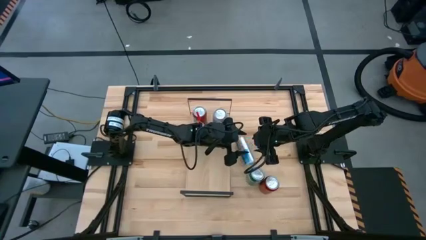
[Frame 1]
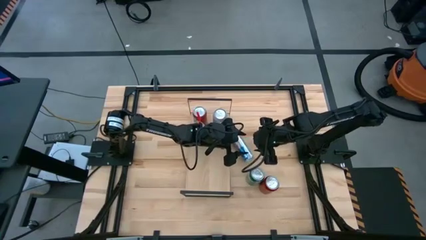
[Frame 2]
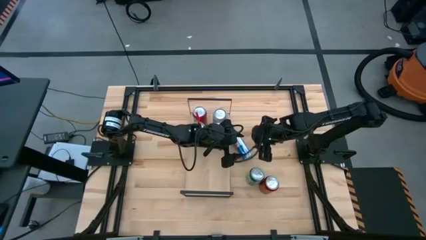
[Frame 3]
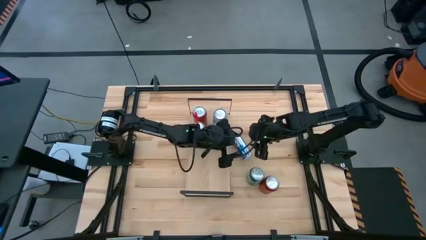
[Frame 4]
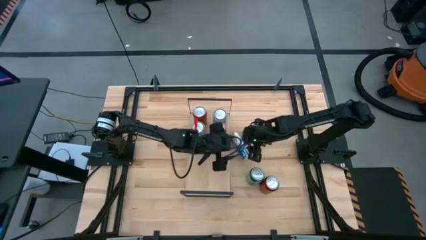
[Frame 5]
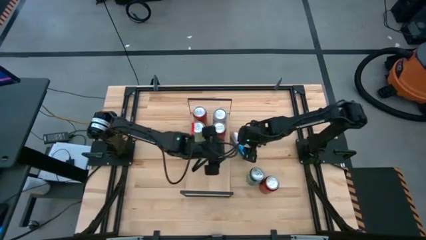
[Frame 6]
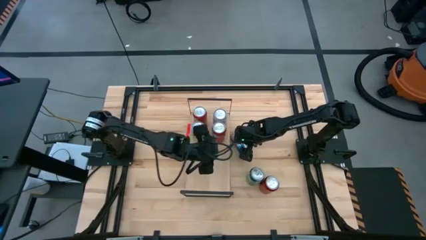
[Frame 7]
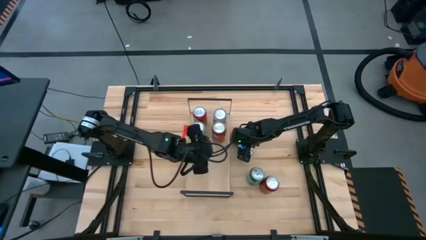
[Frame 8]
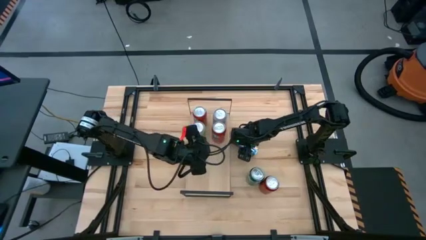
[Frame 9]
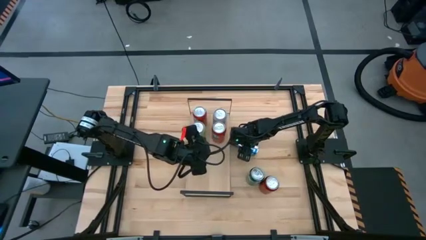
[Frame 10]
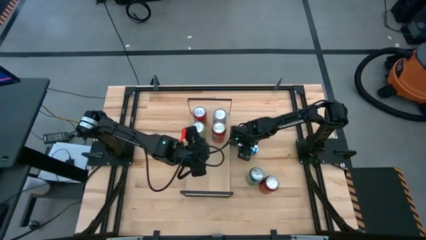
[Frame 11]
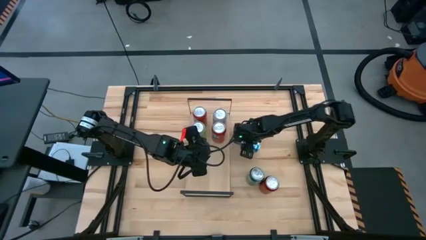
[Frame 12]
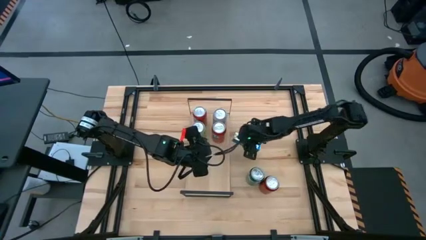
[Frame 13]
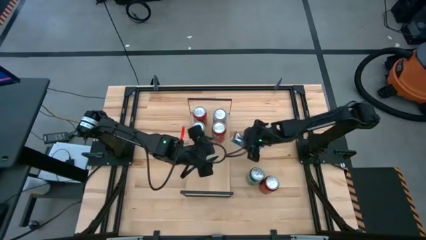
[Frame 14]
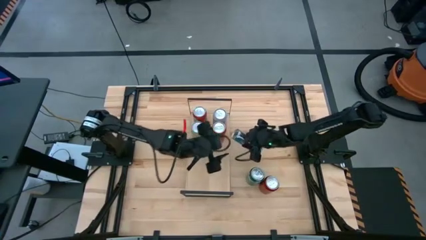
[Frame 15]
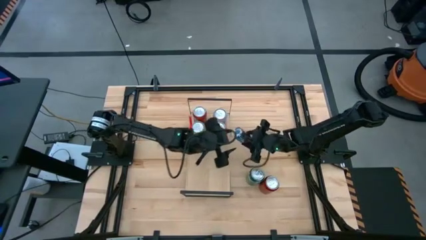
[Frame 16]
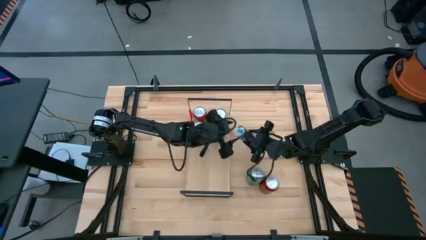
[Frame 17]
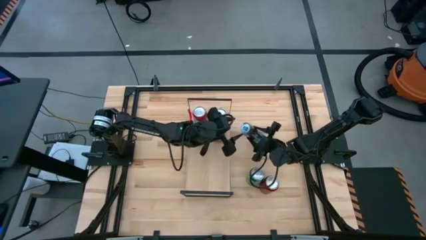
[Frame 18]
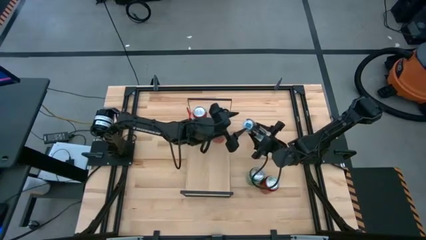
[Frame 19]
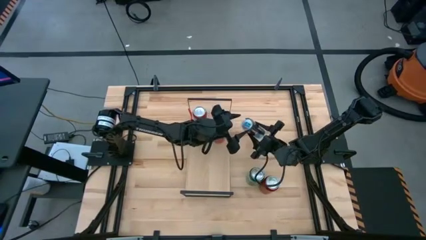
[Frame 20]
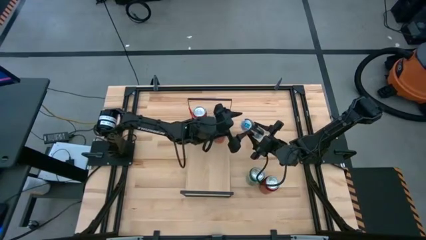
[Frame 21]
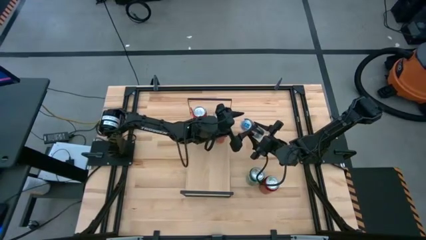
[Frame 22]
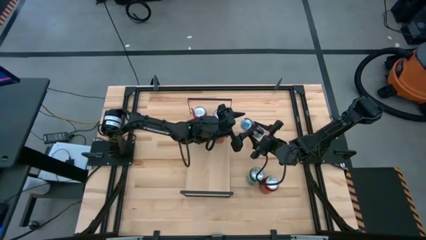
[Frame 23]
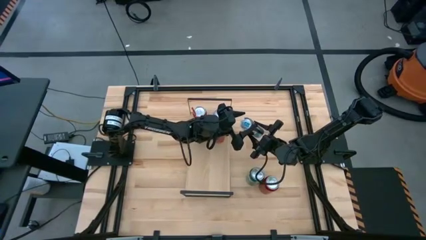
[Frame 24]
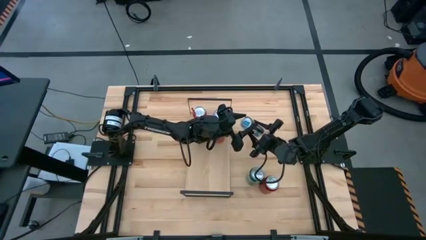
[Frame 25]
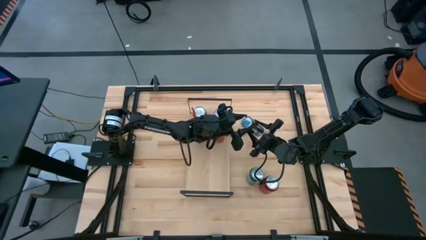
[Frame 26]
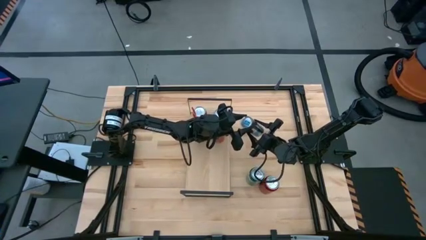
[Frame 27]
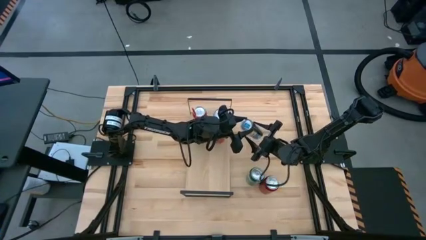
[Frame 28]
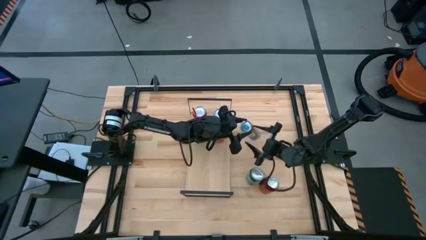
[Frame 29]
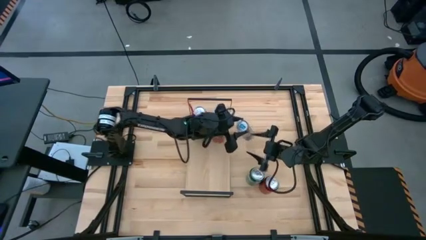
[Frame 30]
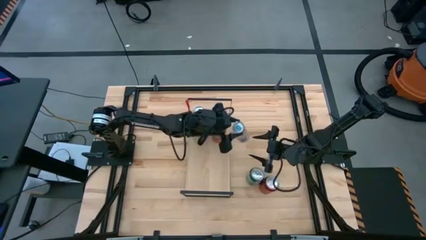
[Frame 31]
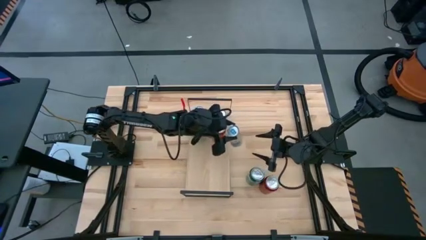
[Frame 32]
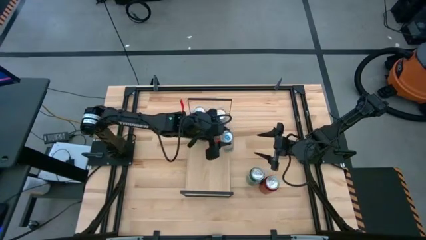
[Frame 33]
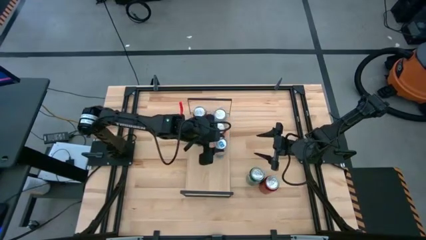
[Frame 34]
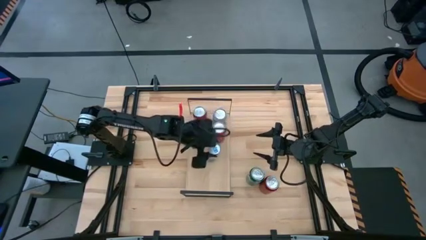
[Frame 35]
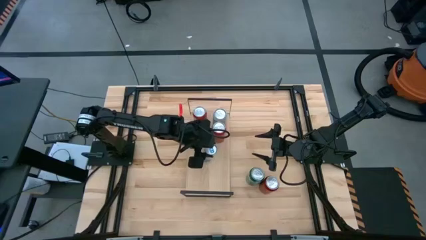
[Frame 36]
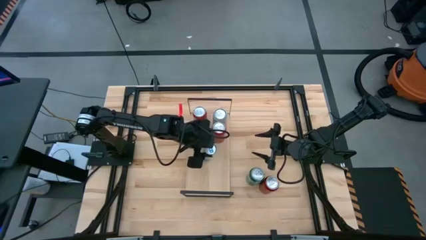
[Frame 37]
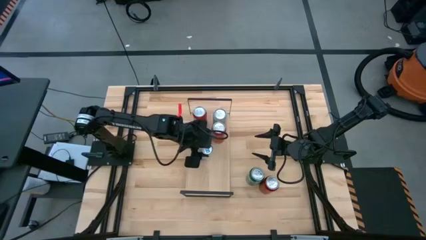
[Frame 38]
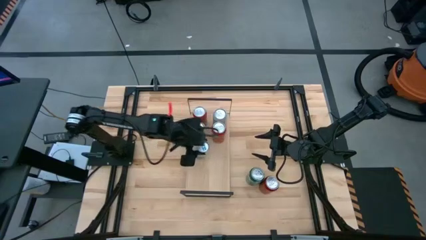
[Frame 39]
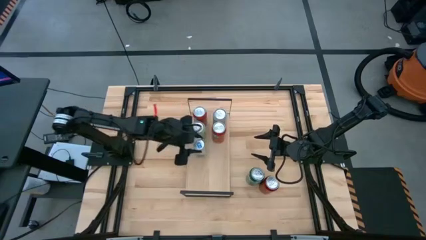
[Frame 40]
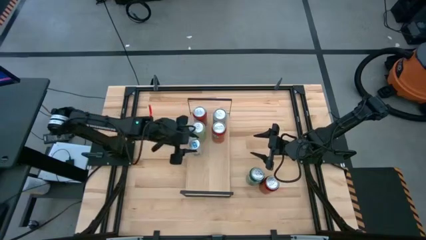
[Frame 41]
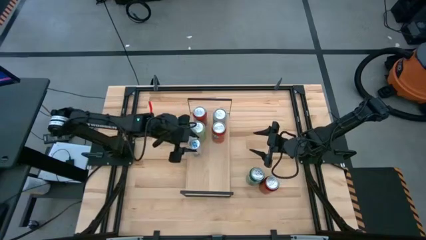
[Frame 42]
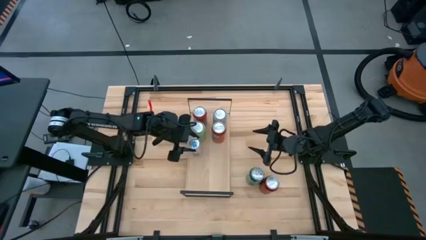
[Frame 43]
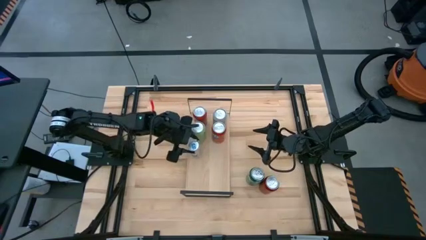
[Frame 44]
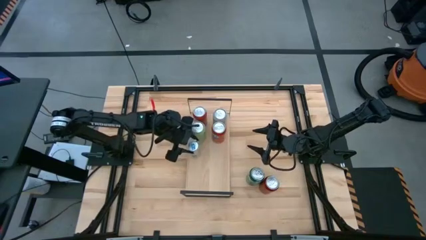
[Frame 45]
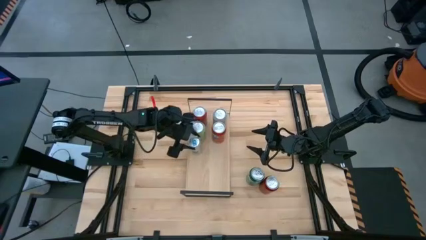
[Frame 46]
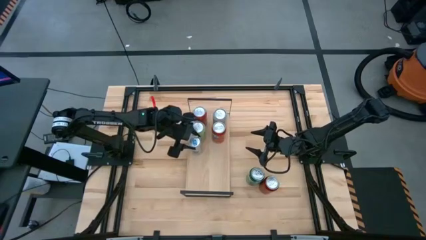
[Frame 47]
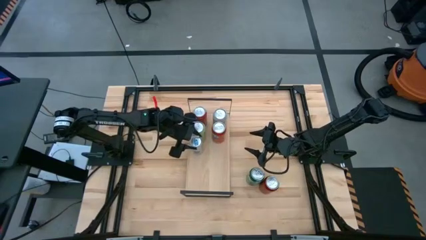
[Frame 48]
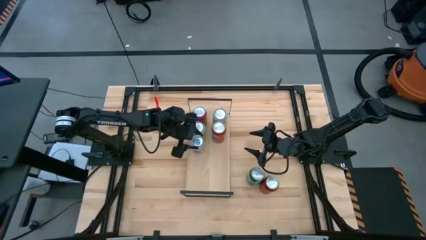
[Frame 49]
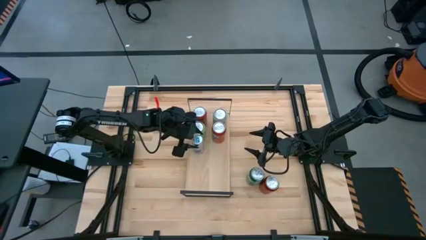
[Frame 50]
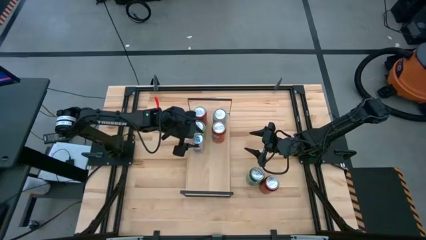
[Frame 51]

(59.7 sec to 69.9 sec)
Task: Place canned beverage on shelf
Put the blue soda can on the shelf

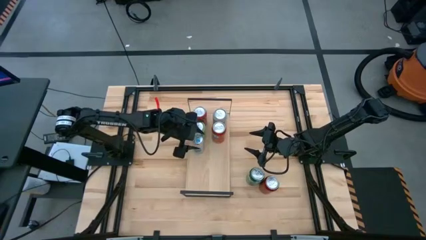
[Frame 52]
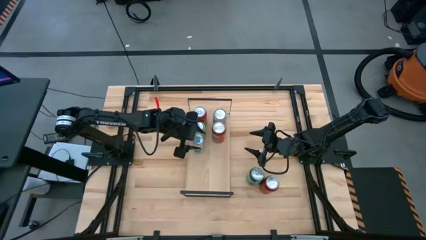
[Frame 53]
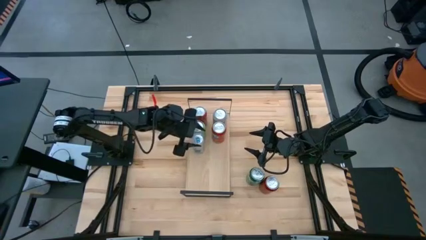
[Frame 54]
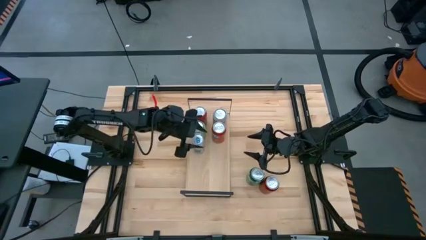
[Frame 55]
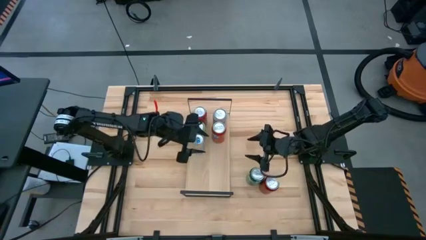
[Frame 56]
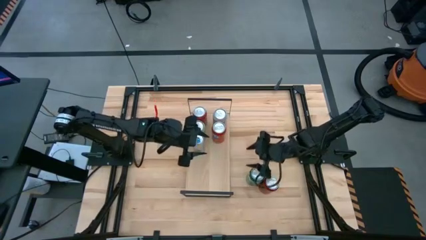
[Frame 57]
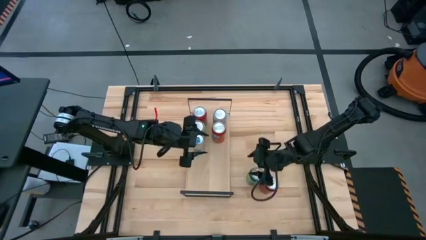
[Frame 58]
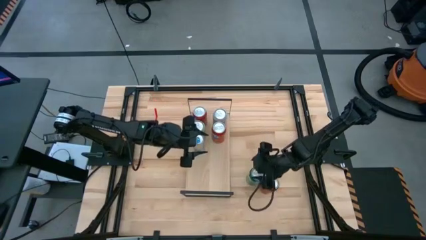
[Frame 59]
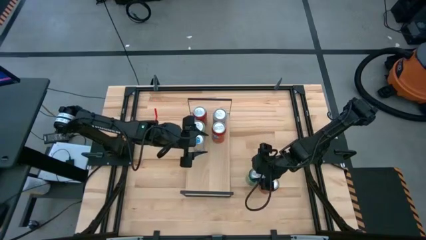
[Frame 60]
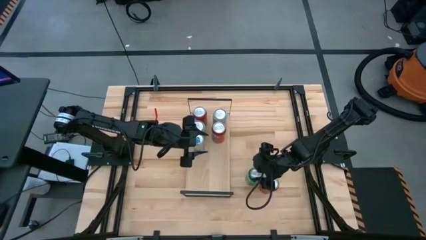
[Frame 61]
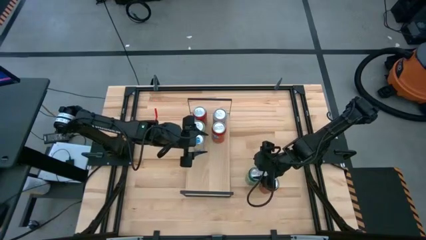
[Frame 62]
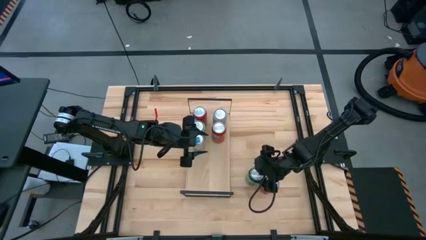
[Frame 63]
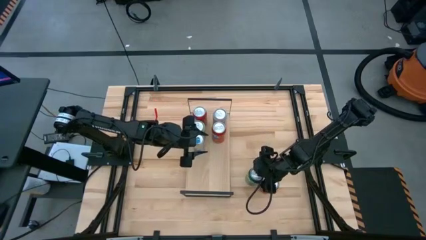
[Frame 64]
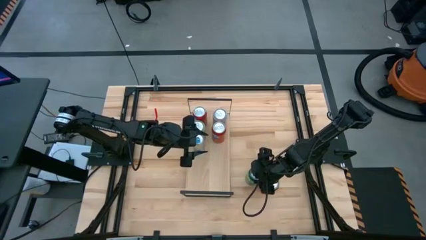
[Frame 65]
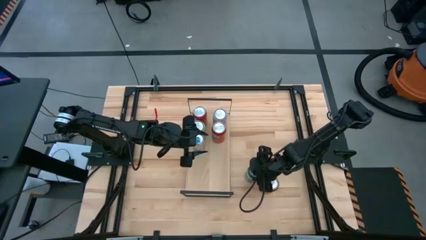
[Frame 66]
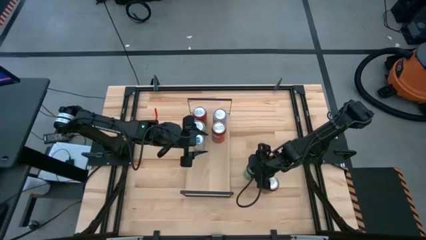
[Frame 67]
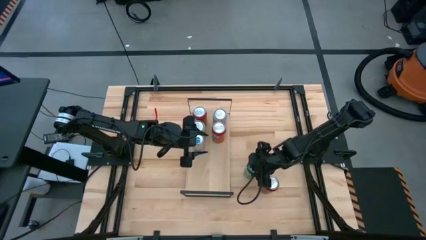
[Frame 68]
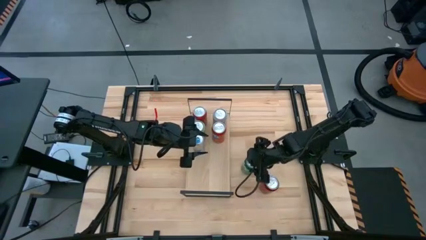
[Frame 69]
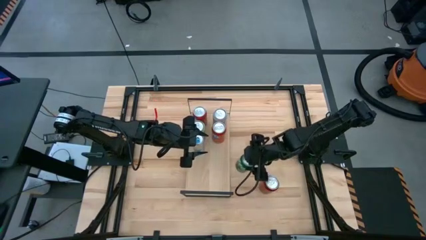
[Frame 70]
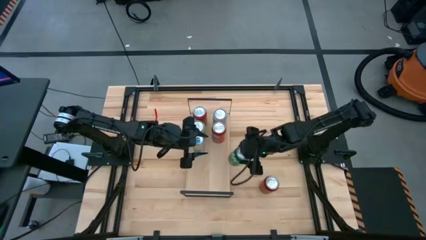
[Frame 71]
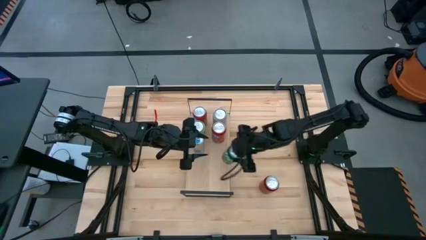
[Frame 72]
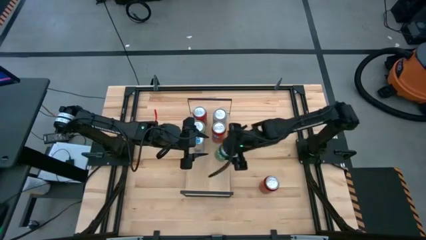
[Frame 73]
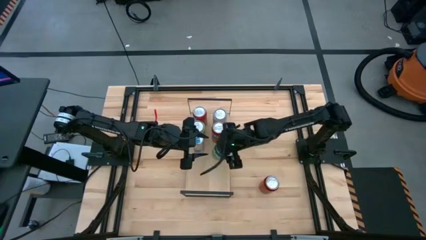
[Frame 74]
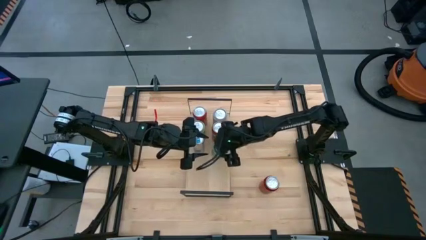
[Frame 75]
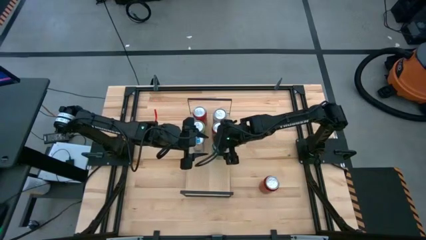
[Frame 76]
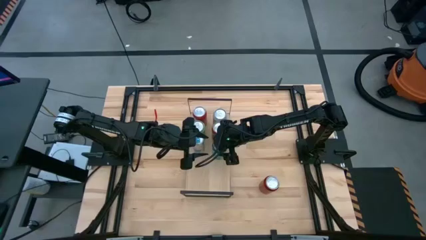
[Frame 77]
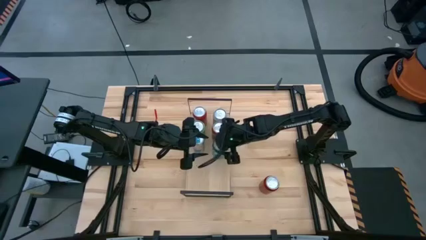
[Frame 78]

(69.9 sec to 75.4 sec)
Put the green soda can on the shelf
